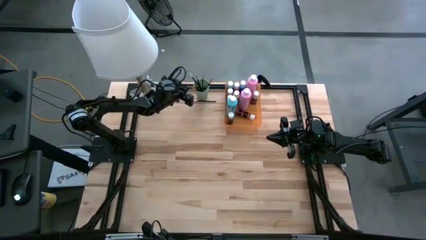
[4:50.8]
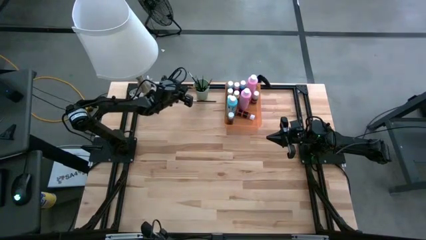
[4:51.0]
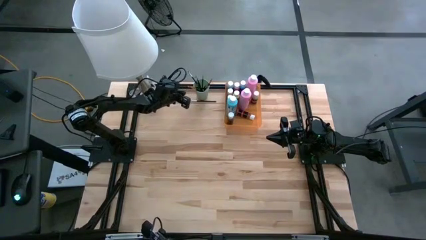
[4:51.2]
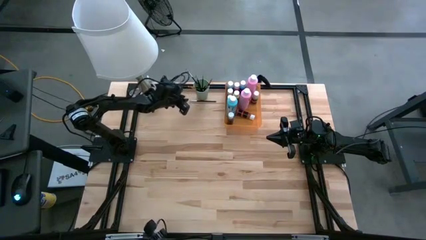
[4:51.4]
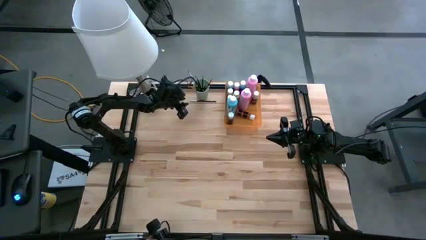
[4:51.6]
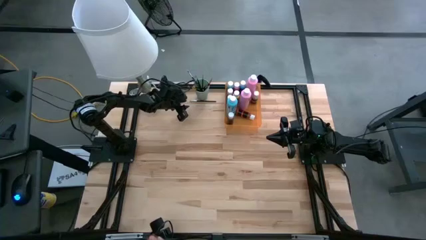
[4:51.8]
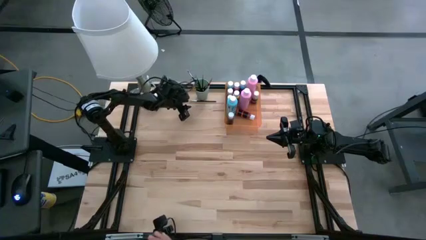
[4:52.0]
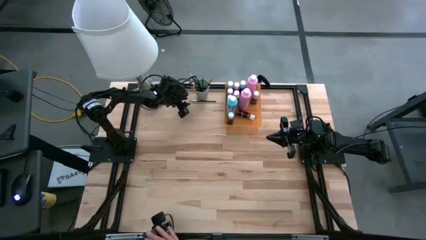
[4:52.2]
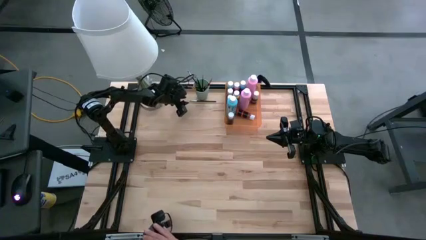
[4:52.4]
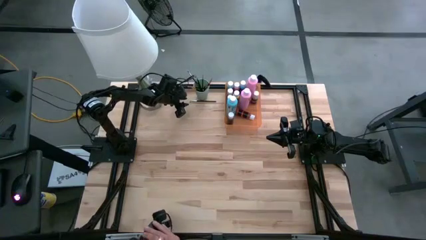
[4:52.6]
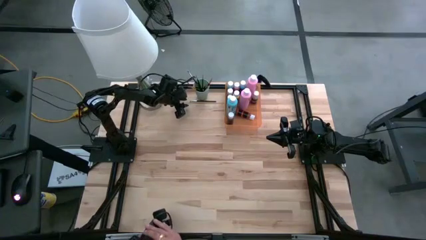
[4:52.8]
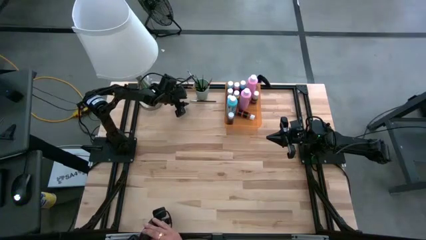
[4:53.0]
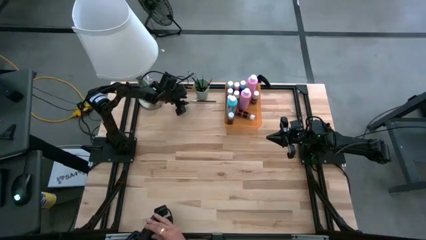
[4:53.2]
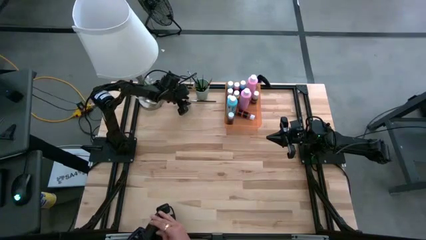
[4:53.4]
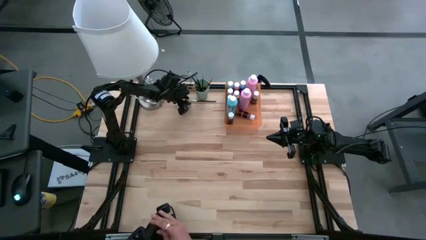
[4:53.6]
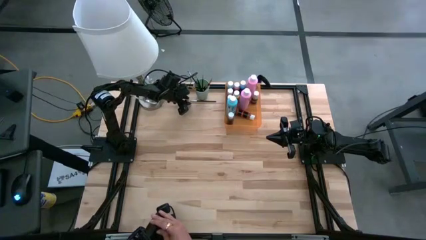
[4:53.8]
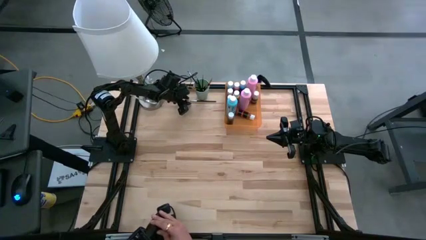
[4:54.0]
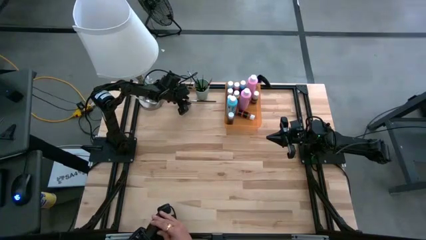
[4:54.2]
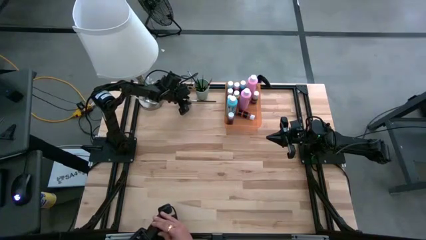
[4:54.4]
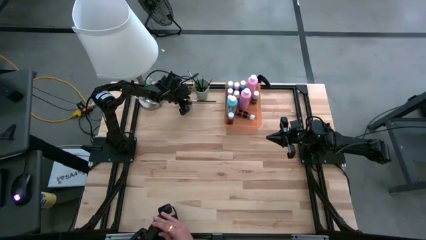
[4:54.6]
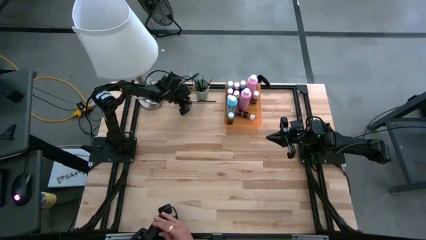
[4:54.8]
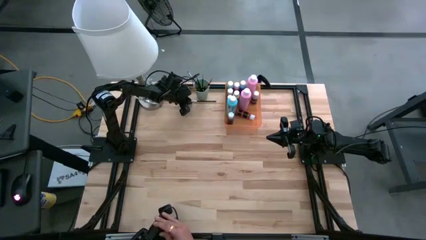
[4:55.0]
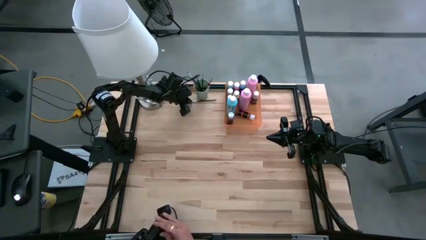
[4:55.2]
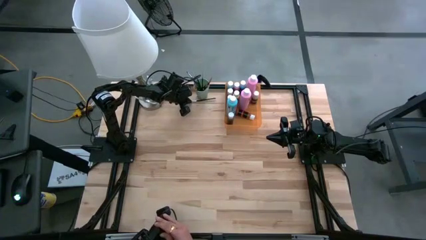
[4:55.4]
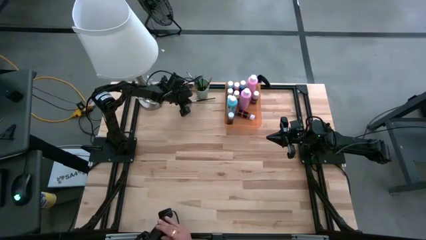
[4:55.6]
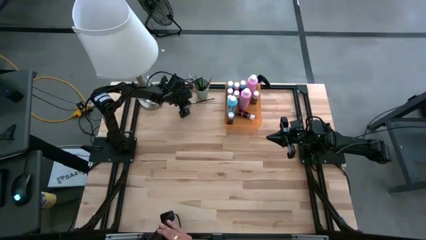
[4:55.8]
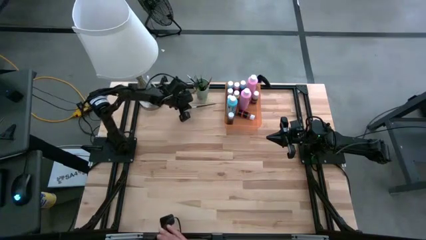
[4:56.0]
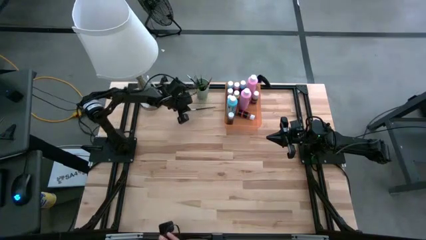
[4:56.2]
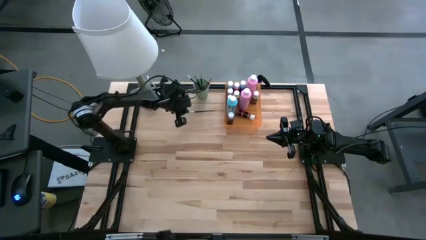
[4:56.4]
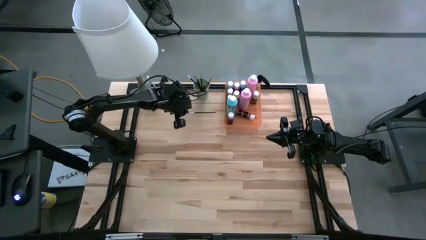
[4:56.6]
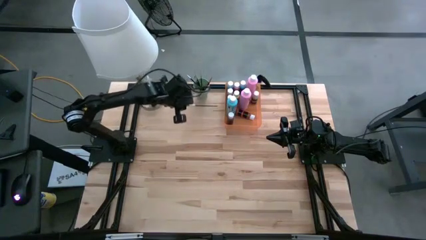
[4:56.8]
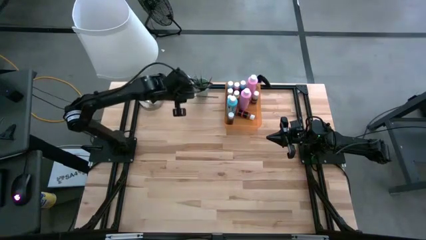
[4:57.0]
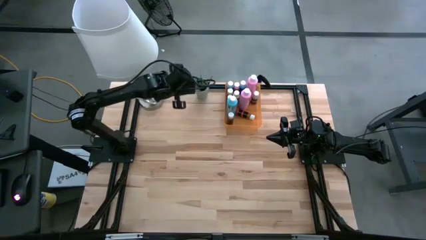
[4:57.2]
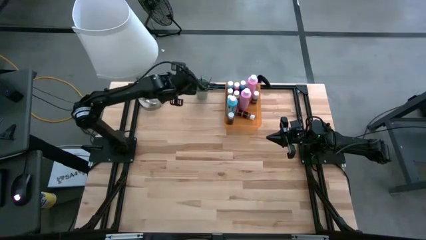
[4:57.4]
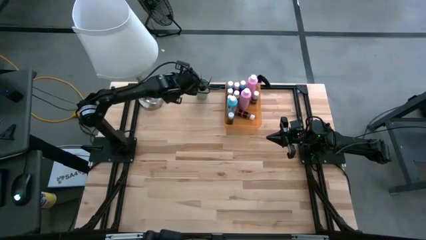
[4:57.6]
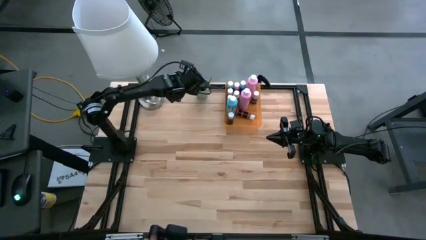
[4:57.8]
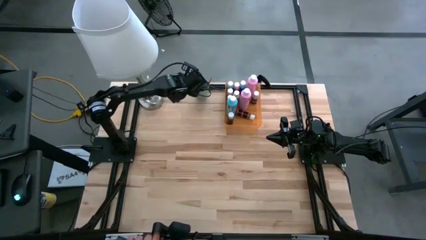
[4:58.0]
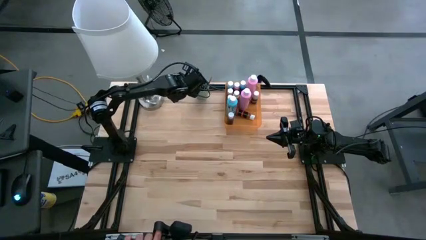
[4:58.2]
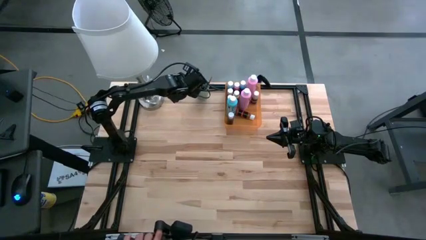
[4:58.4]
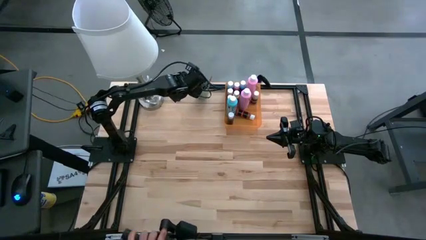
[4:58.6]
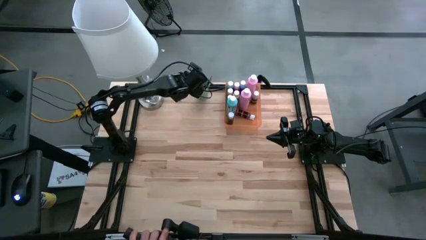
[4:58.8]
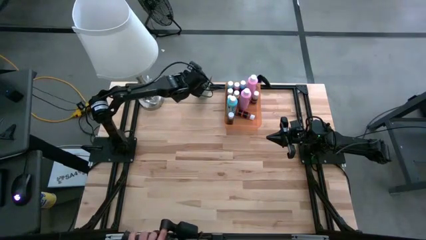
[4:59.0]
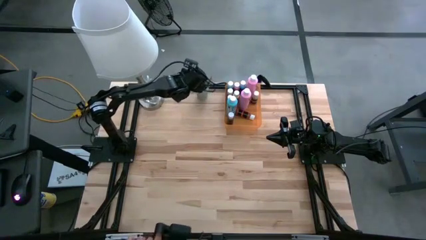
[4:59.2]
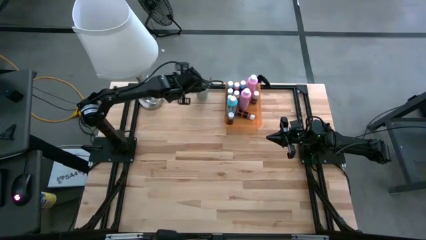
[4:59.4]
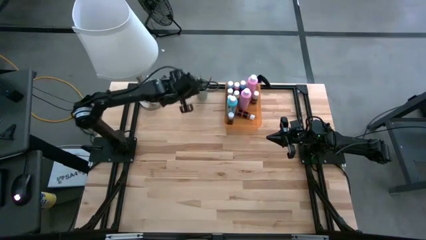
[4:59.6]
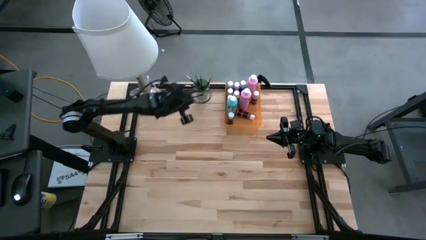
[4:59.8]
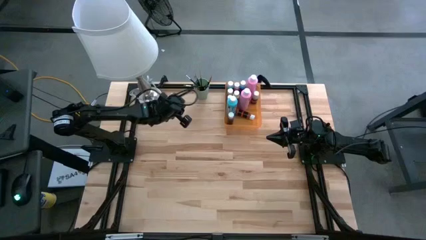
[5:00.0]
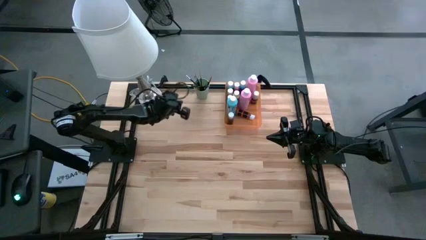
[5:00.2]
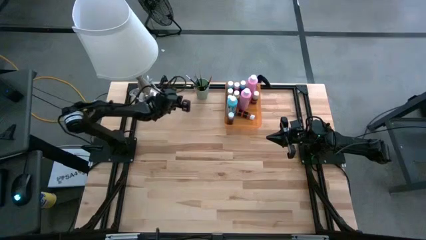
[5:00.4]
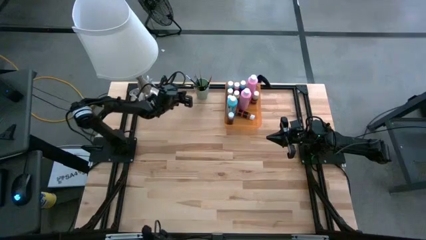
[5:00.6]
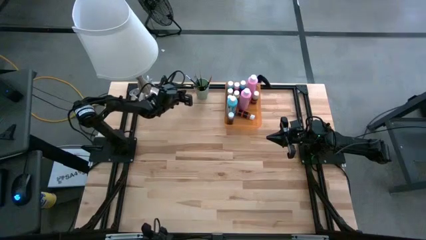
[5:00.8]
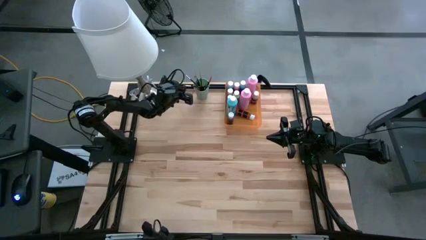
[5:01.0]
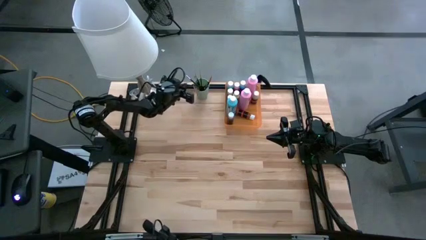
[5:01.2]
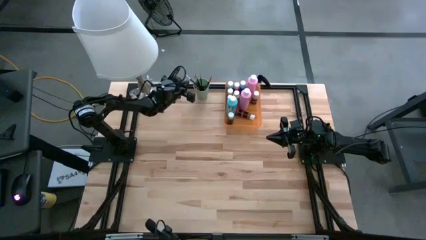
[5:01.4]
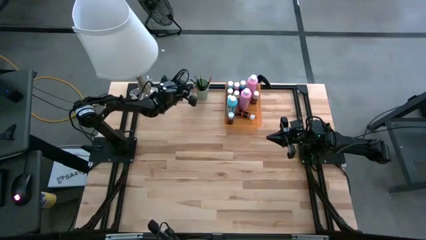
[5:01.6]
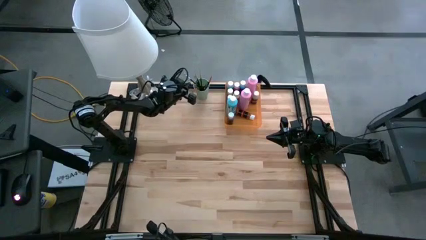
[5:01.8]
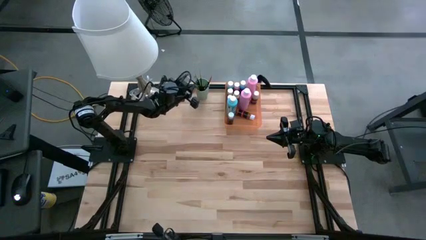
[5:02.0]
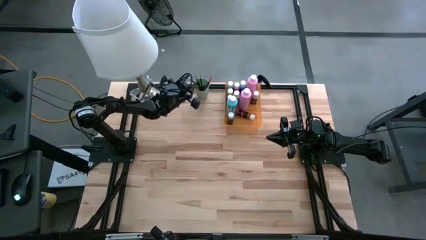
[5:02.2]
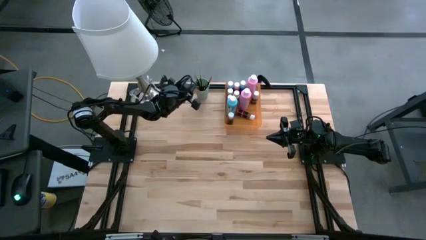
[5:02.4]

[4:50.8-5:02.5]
Task: Pick & Place Paint Supplies
Put the black paint brush into the green cup

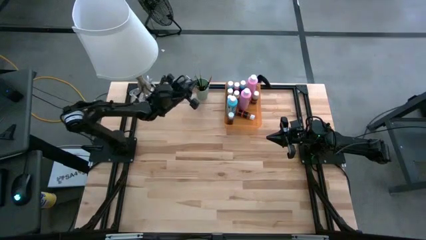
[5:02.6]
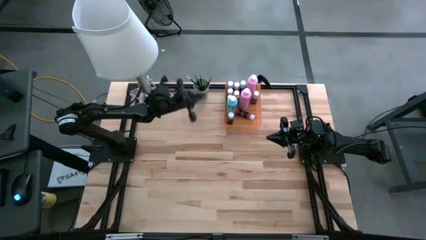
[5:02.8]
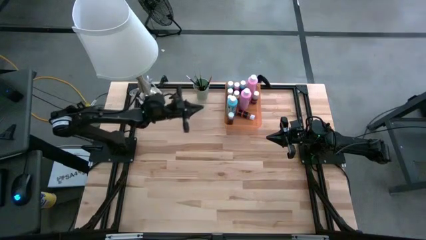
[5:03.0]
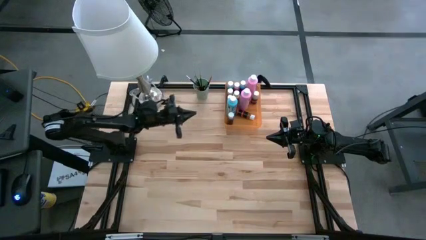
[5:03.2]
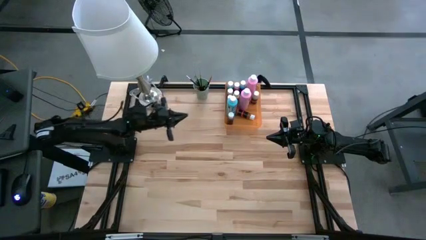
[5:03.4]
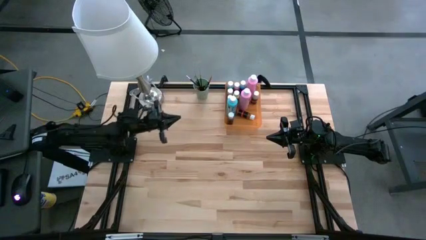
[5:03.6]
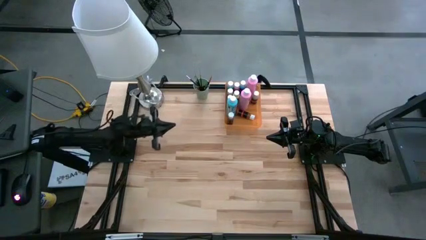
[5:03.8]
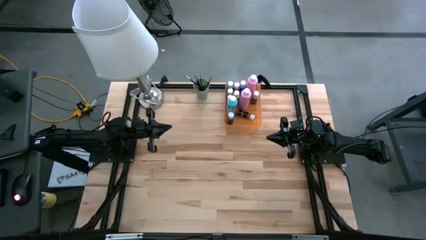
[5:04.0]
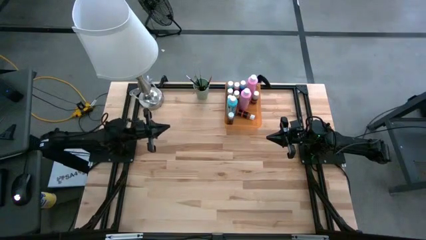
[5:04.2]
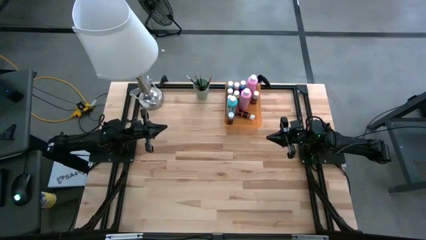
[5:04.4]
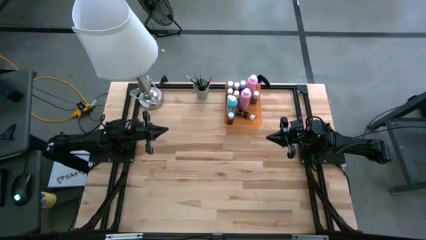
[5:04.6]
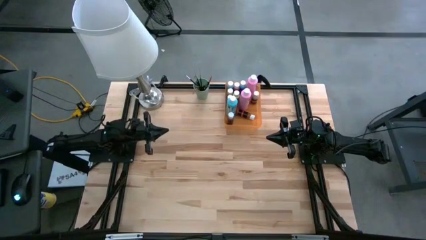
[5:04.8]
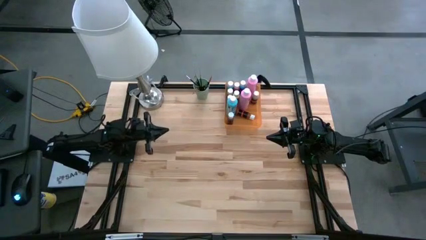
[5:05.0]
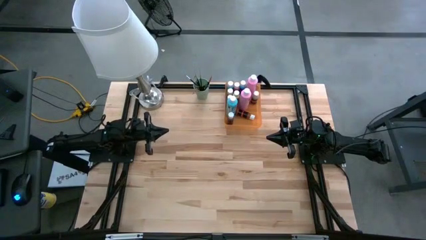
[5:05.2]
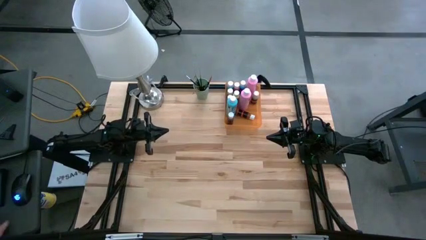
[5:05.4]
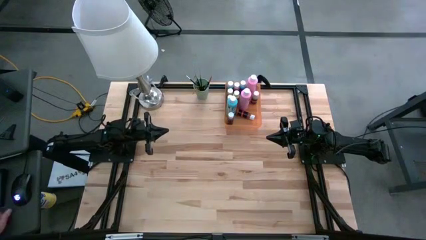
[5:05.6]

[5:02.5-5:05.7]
Return to Home Position
